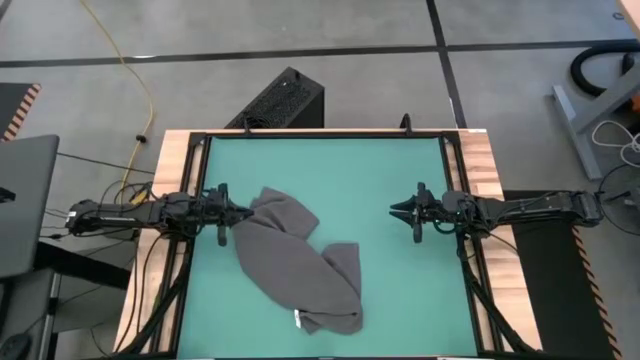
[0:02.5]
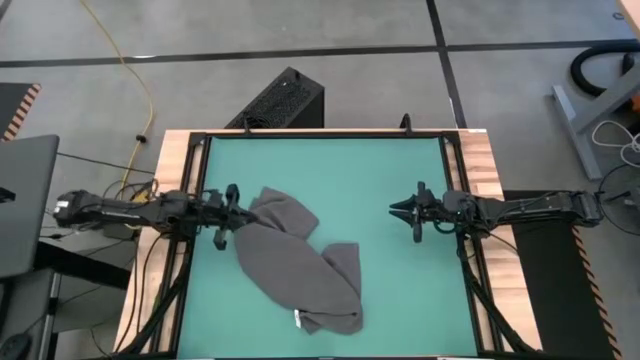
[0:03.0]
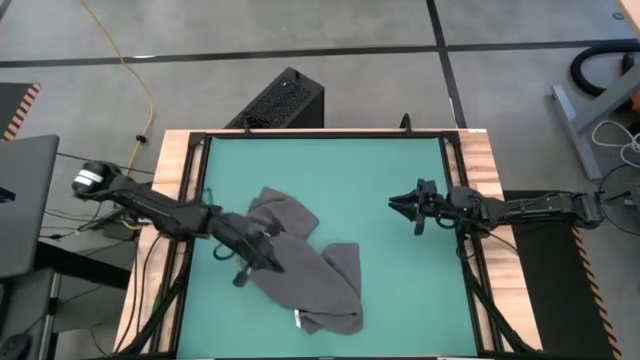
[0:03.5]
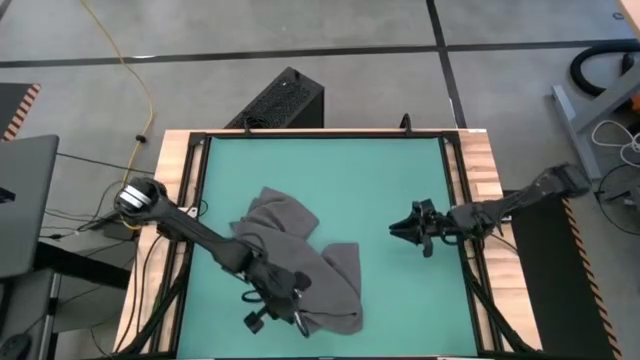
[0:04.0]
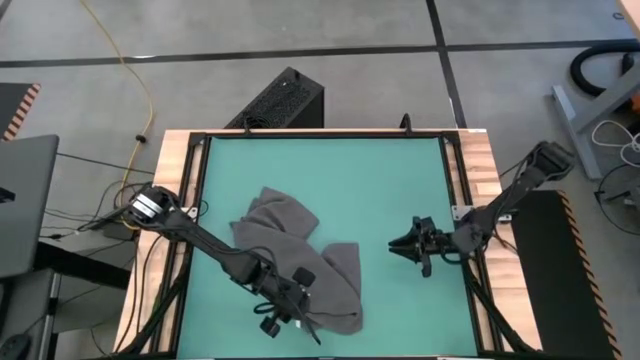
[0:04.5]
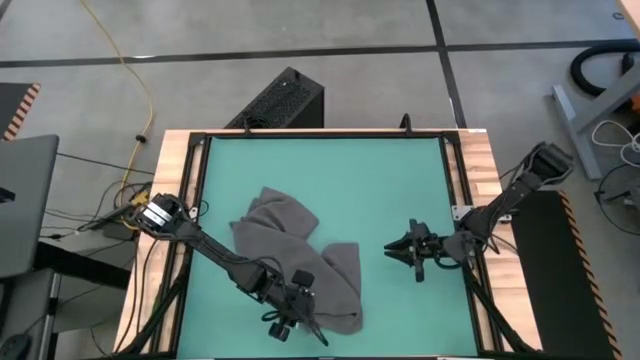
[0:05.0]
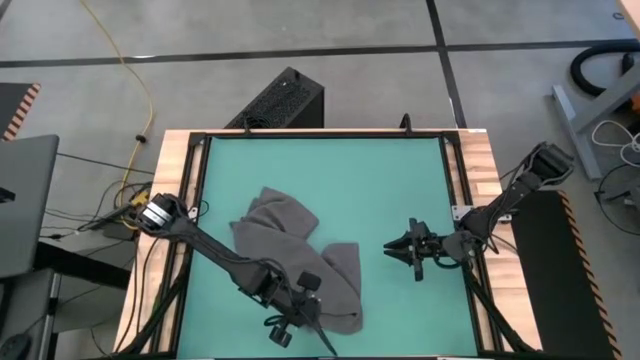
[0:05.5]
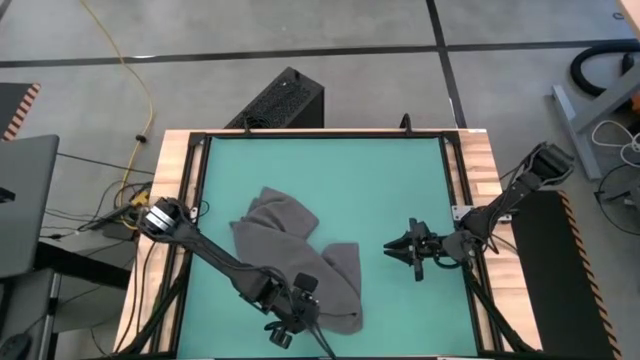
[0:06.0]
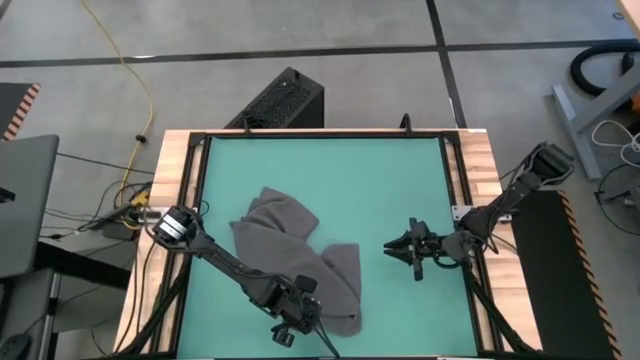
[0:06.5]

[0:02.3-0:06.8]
Task: Roll towel
Roll the gray towel

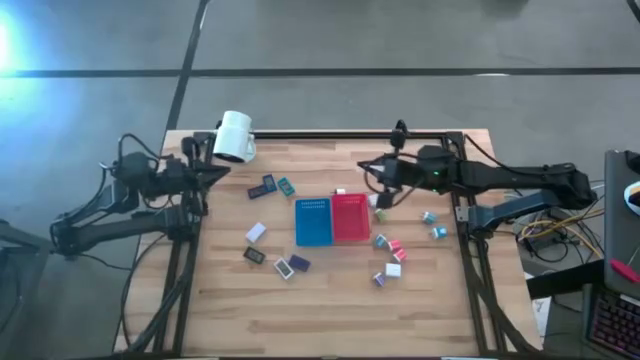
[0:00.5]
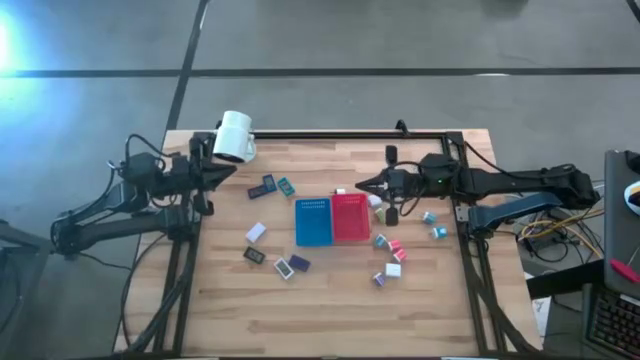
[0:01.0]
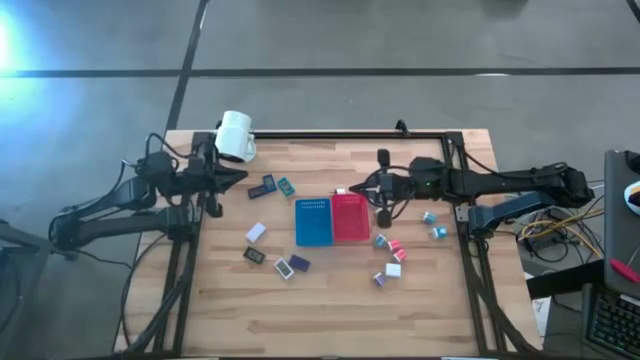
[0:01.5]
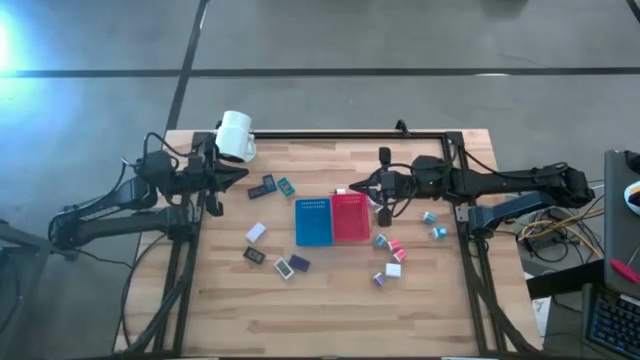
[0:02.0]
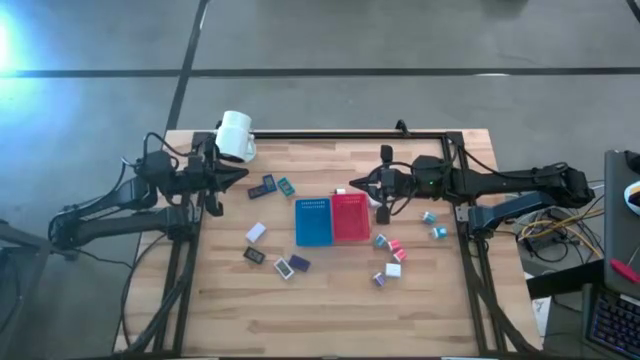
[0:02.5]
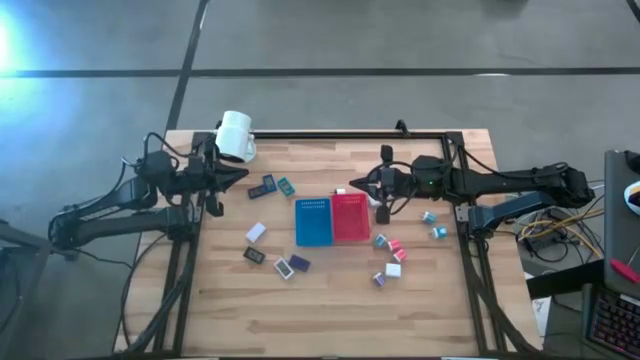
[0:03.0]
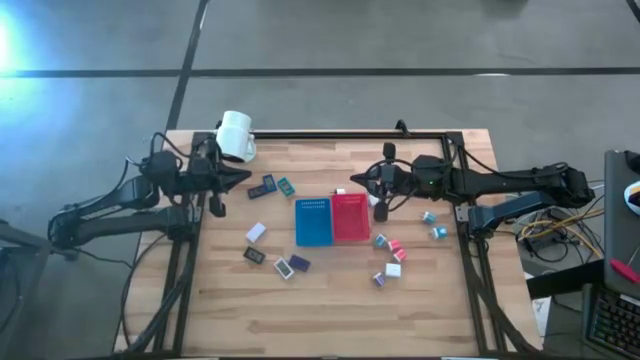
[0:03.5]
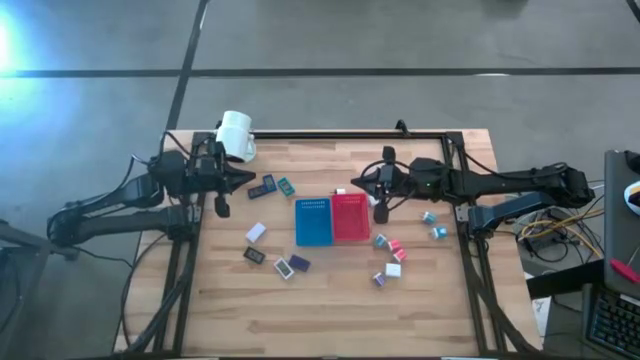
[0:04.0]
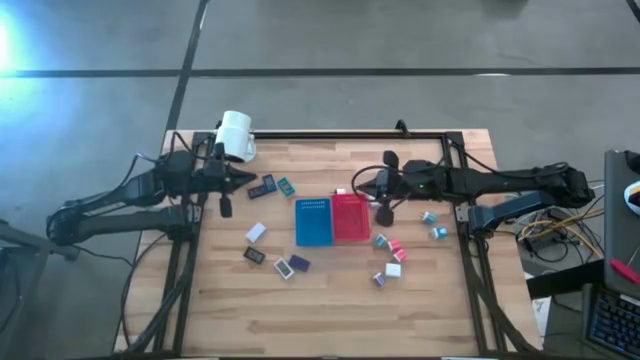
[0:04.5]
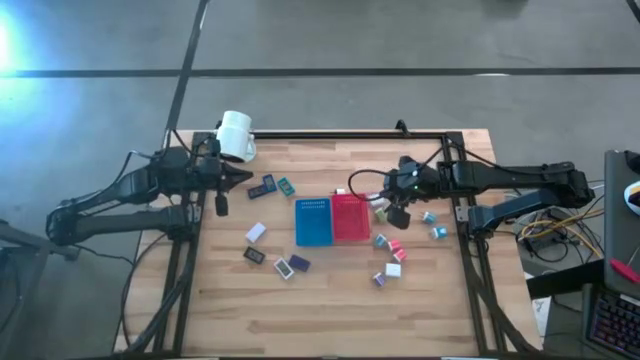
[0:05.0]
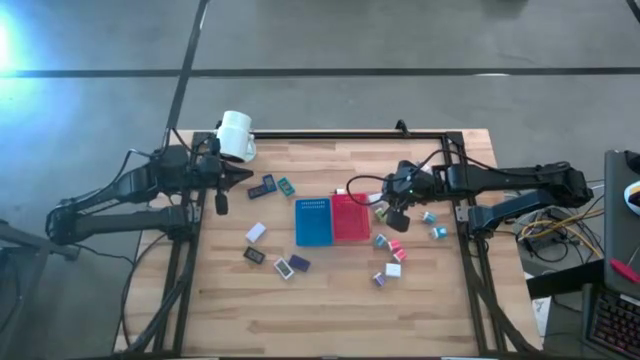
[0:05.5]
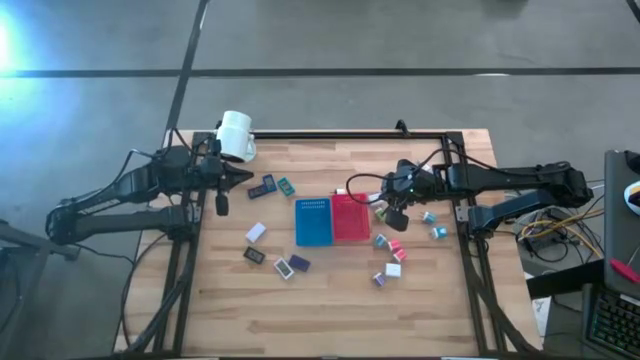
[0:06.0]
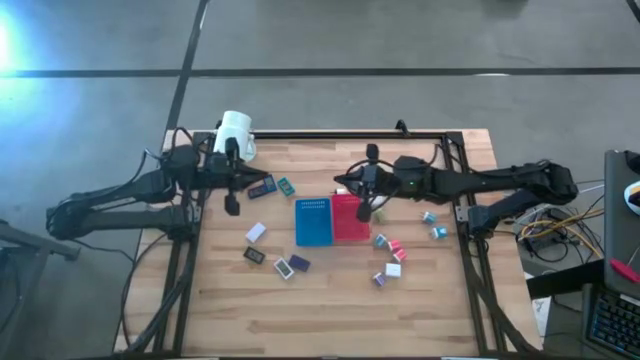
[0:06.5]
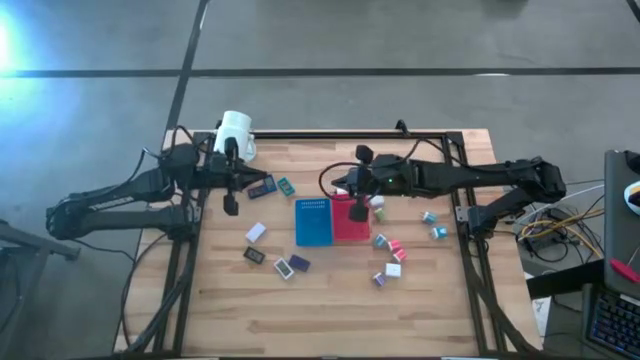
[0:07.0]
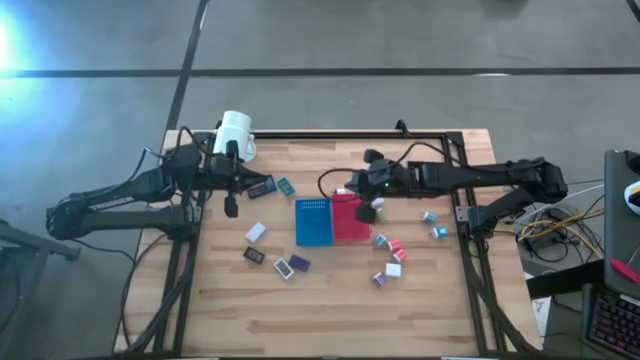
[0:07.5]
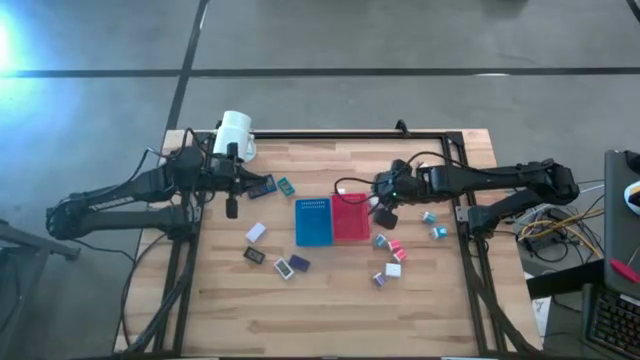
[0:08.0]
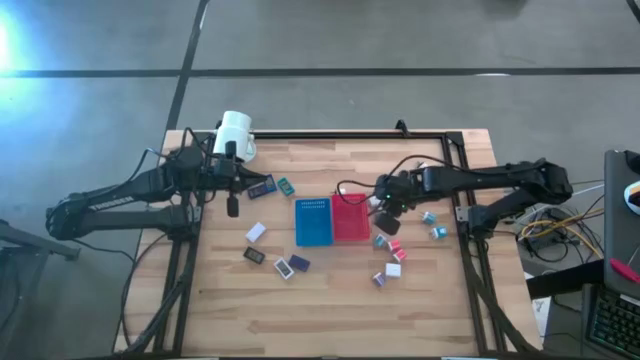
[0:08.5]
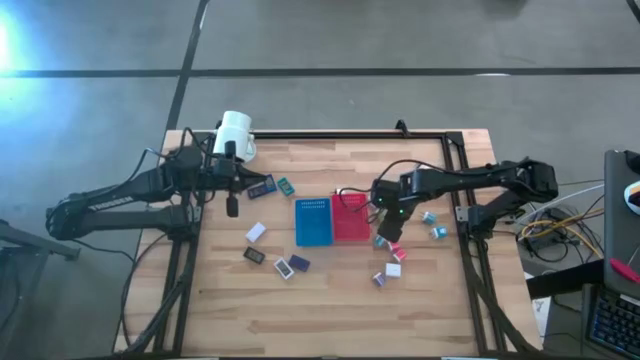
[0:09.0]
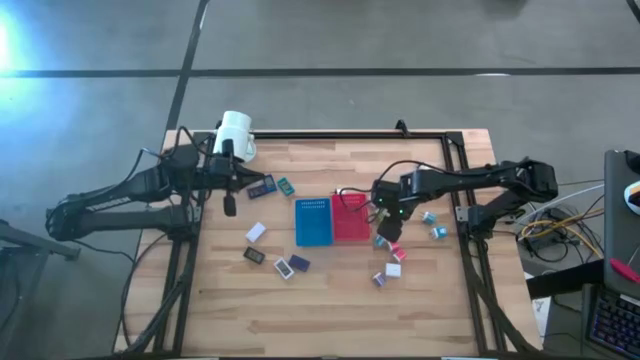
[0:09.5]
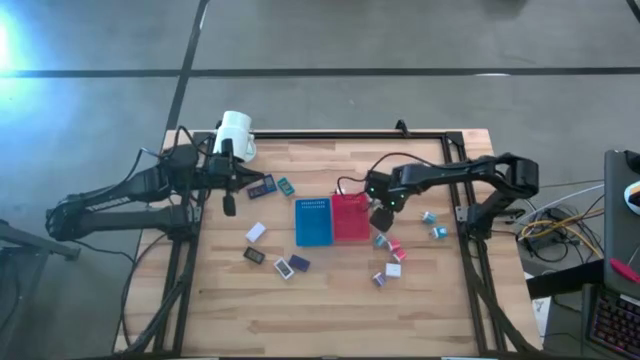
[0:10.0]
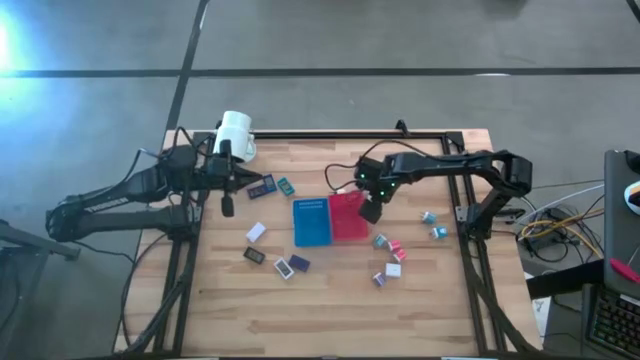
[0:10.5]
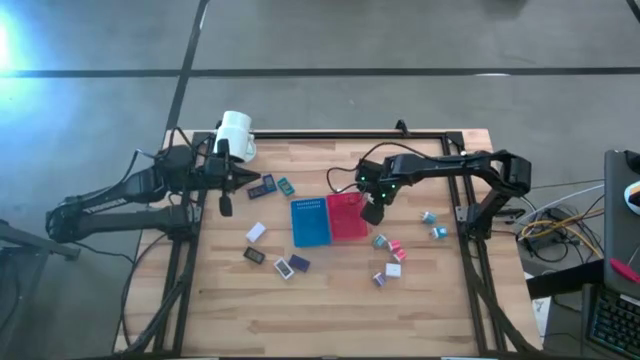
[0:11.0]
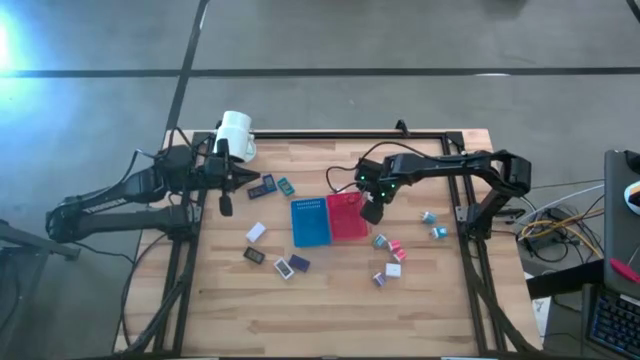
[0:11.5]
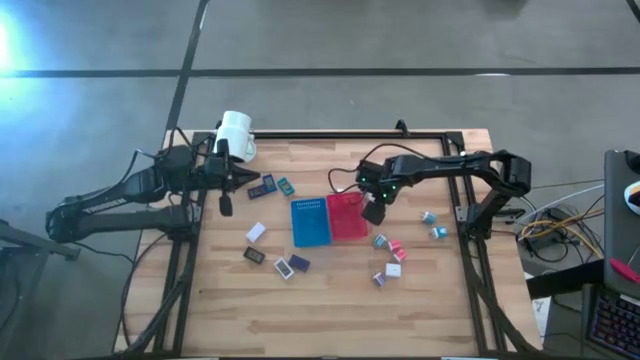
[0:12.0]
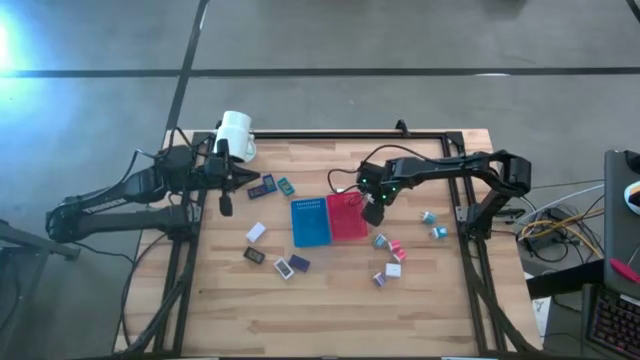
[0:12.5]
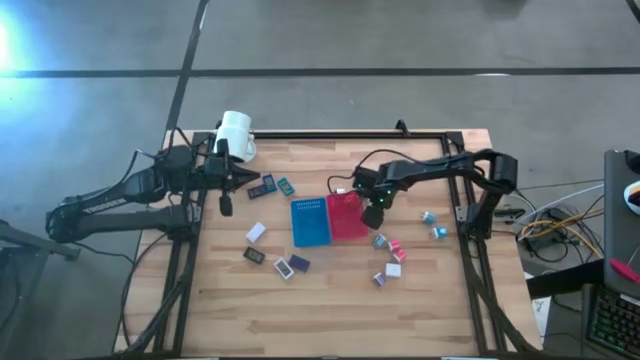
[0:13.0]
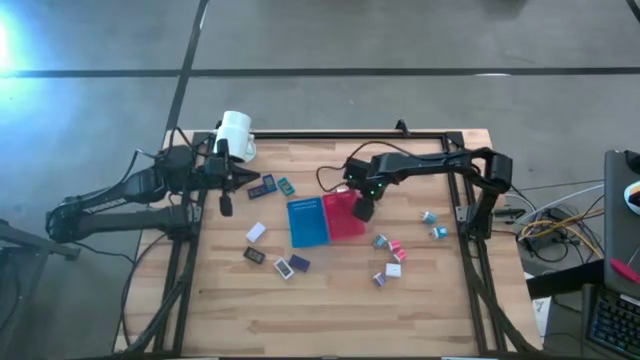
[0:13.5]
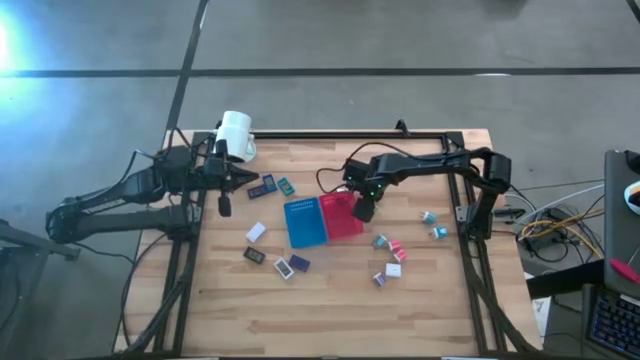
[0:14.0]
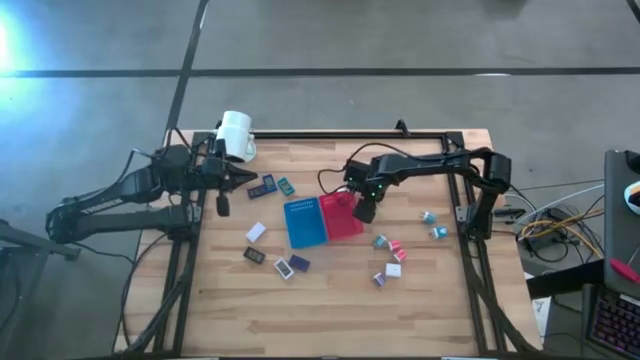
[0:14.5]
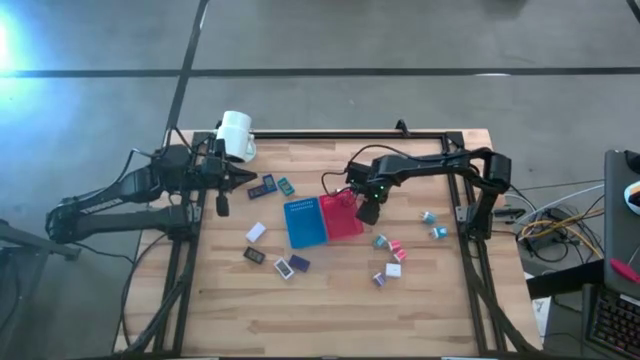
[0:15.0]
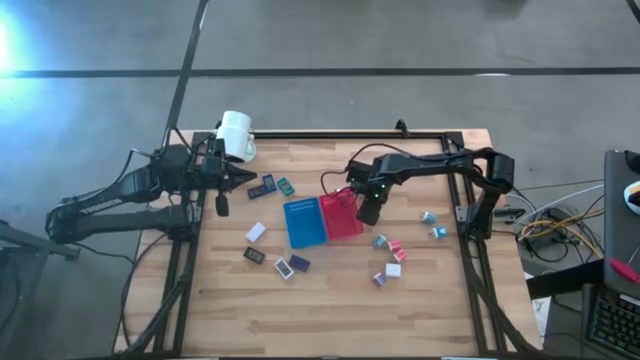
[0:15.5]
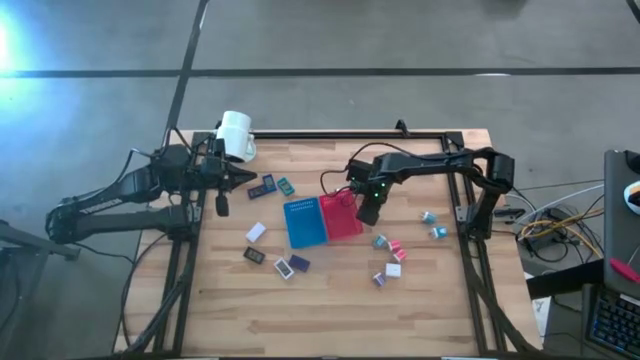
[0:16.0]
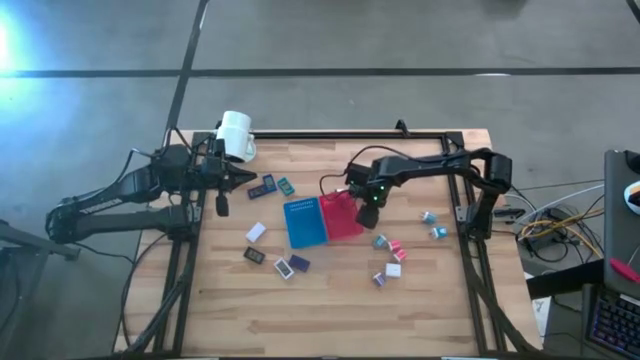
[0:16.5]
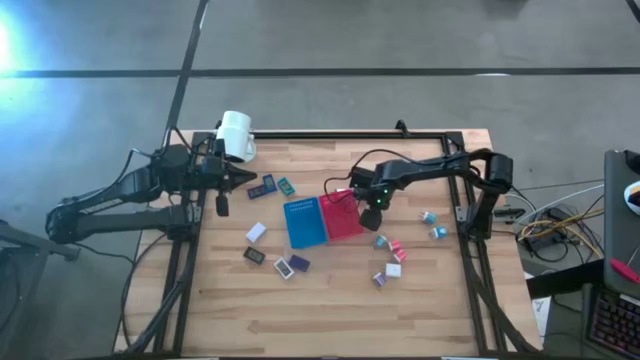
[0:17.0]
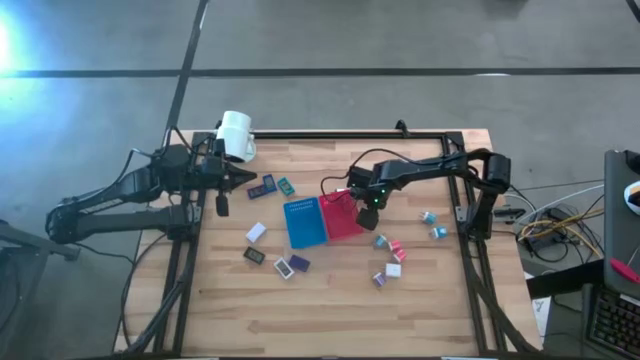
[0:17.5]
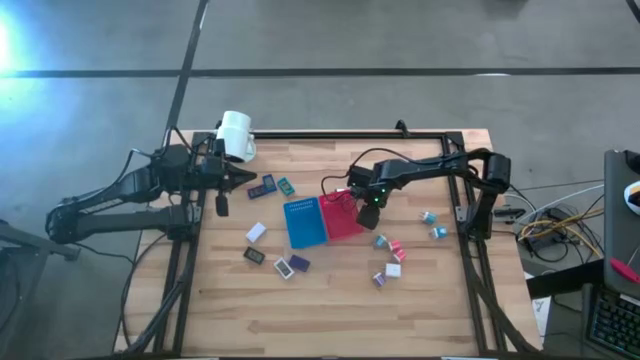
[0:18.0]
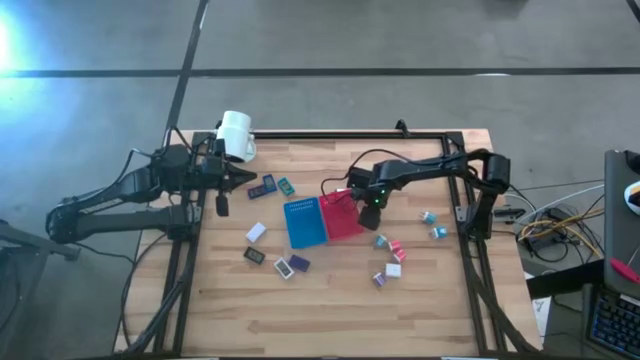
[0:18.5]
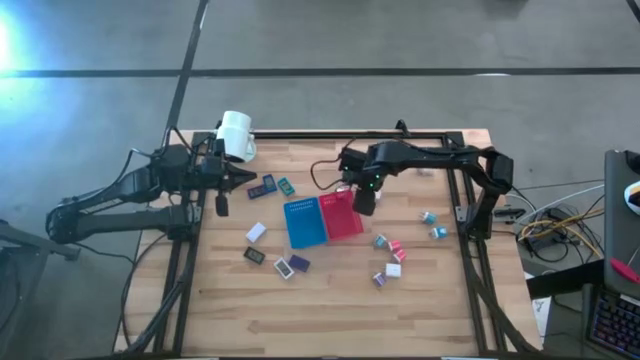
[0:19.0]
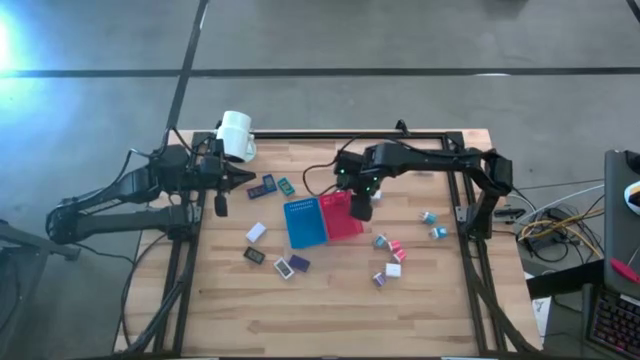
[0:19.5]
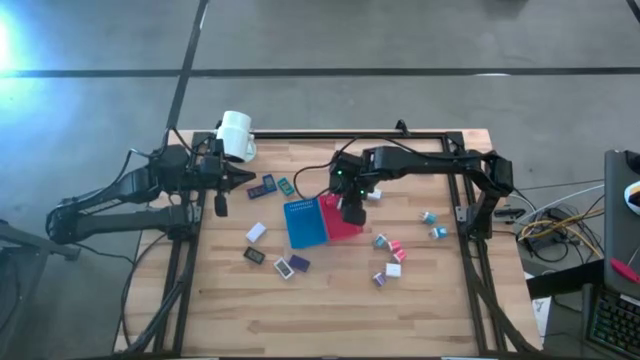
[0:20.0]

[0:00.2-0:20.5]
Task: Pick & Place Office items
Put the green charger adapter into the red bin
